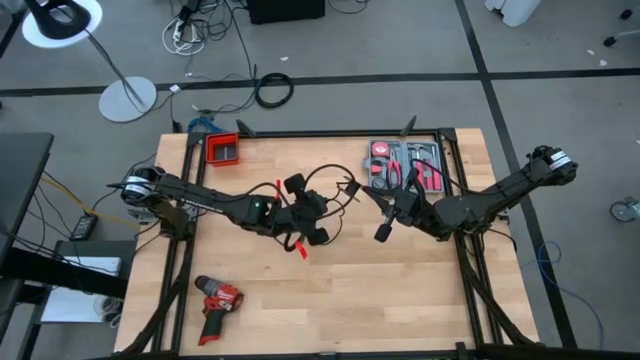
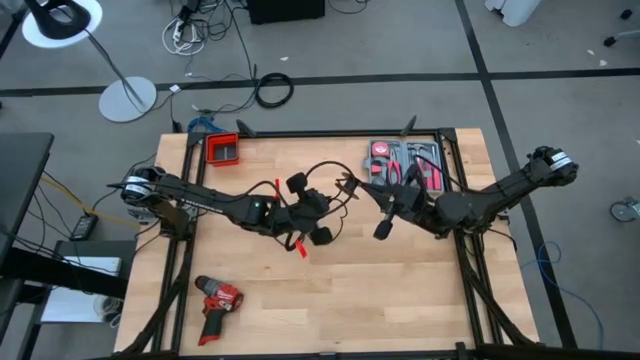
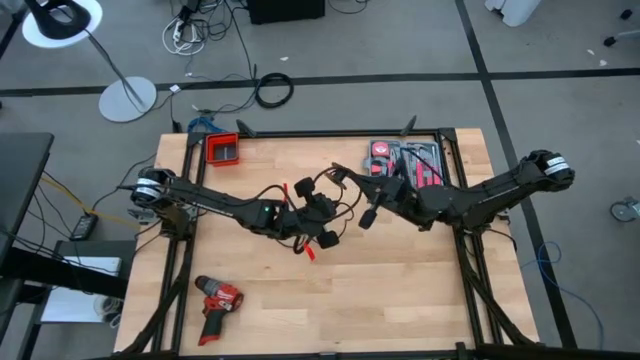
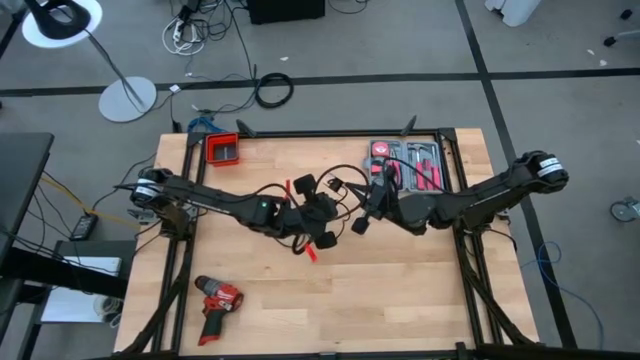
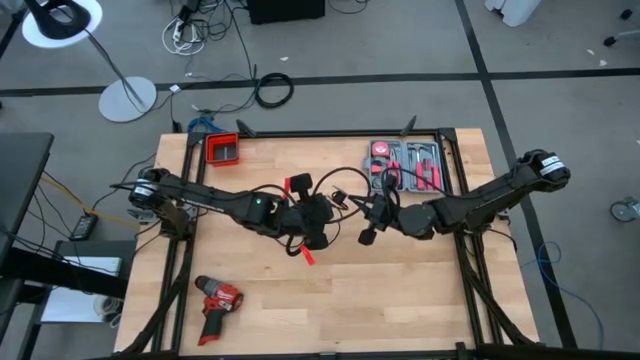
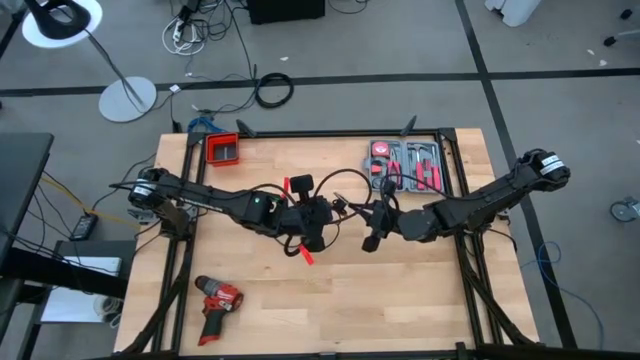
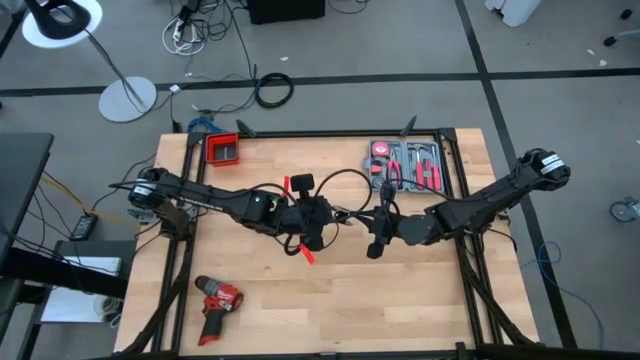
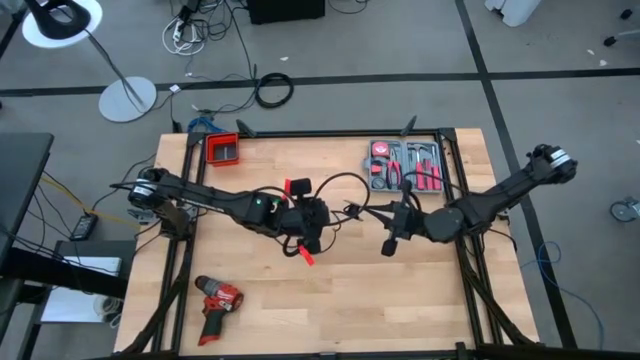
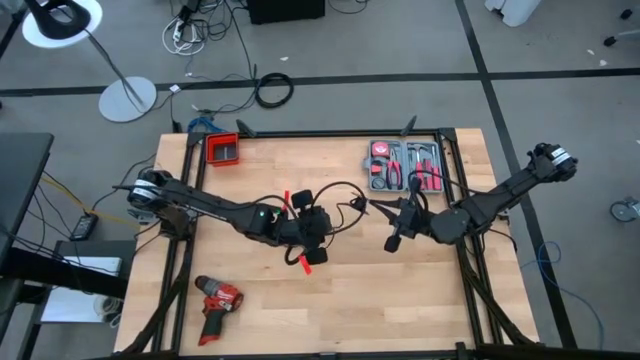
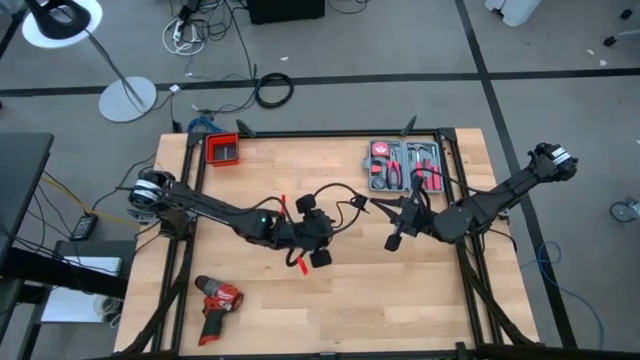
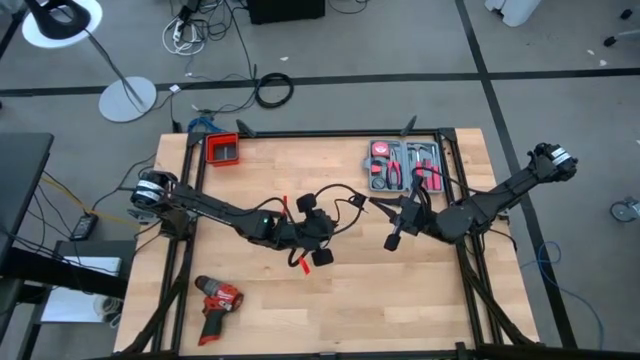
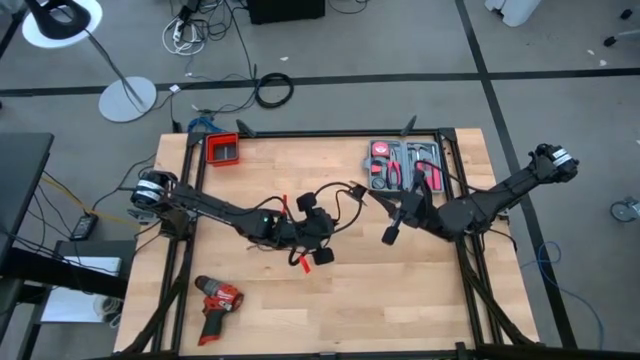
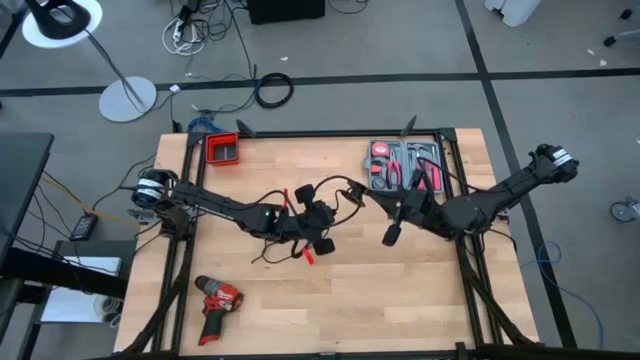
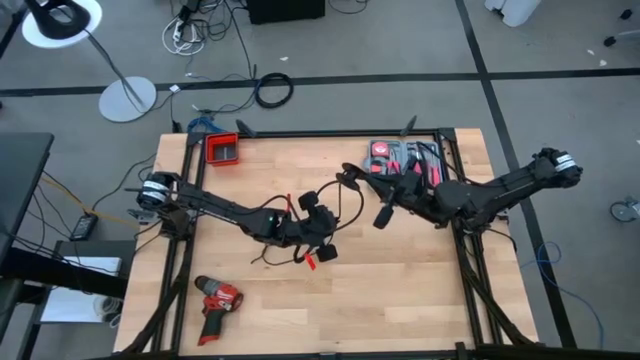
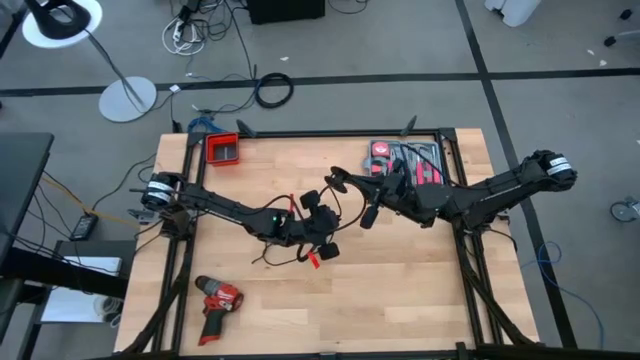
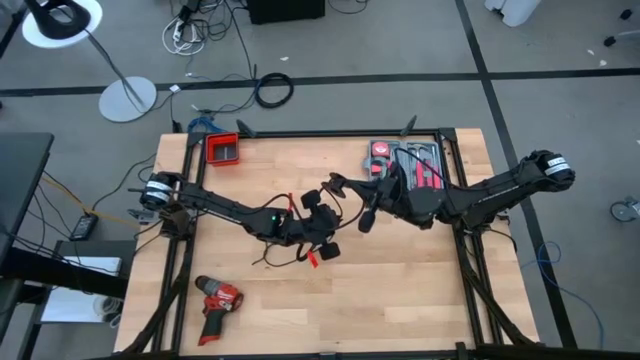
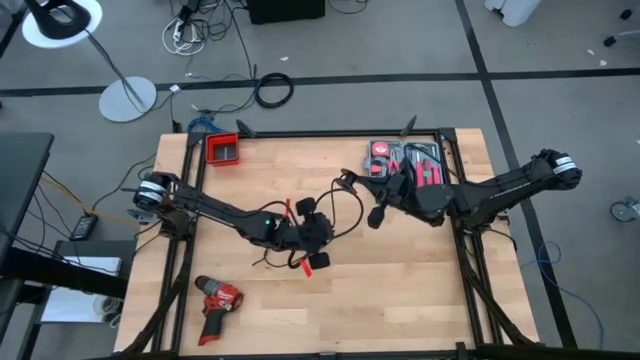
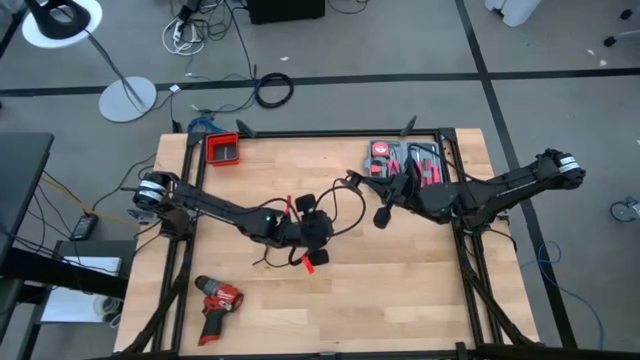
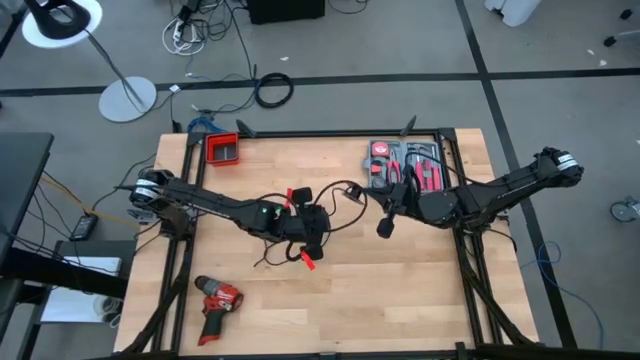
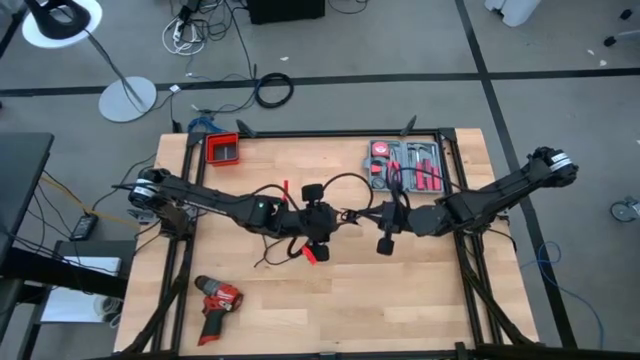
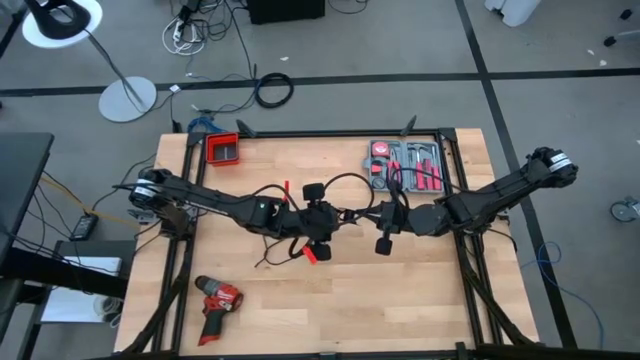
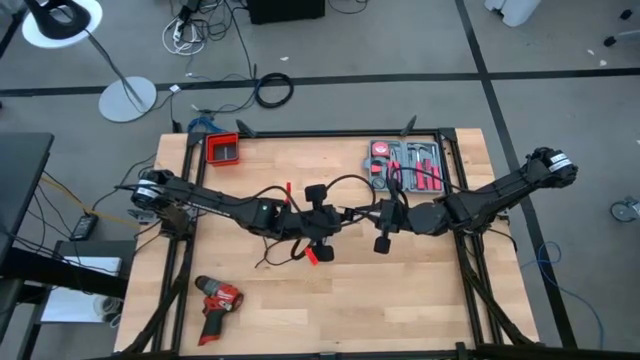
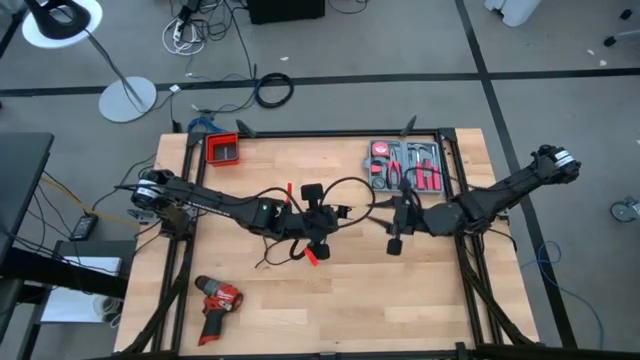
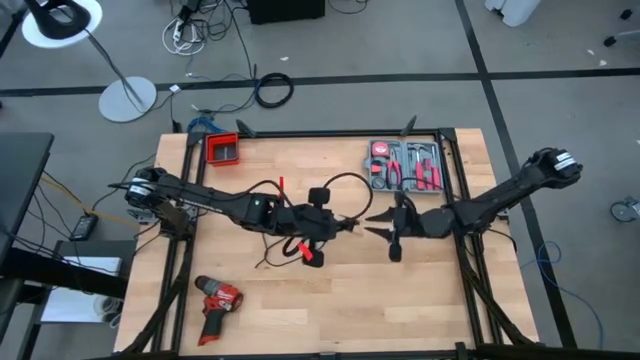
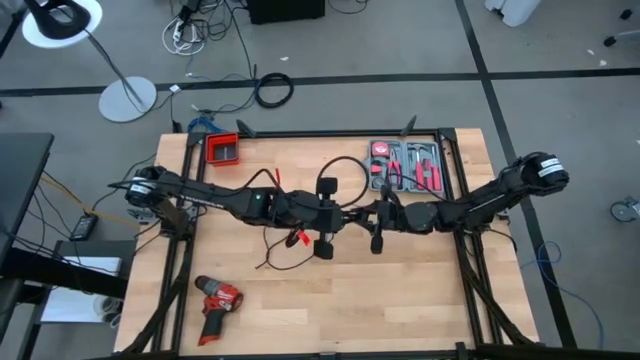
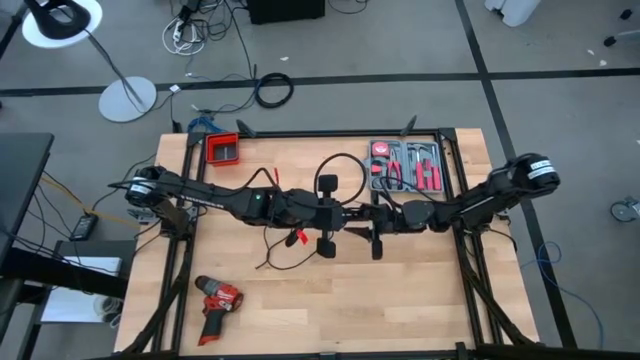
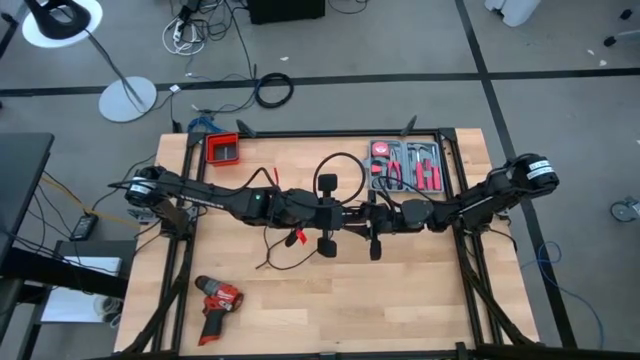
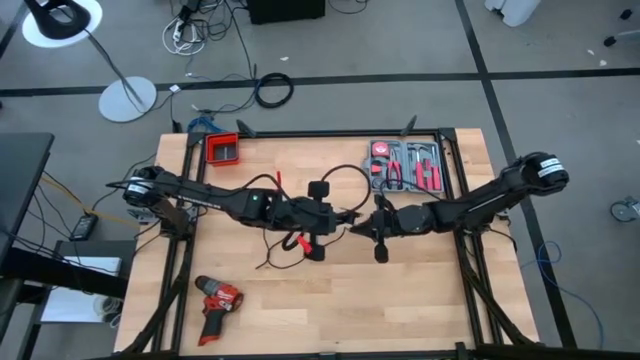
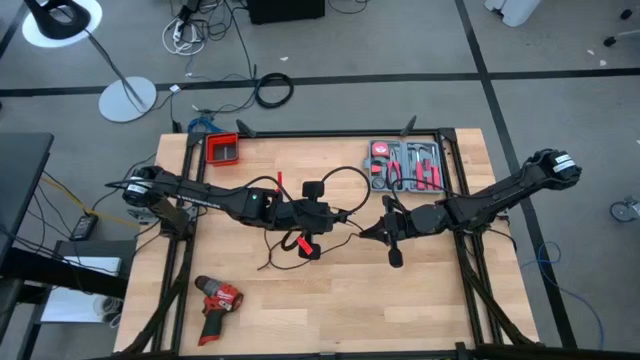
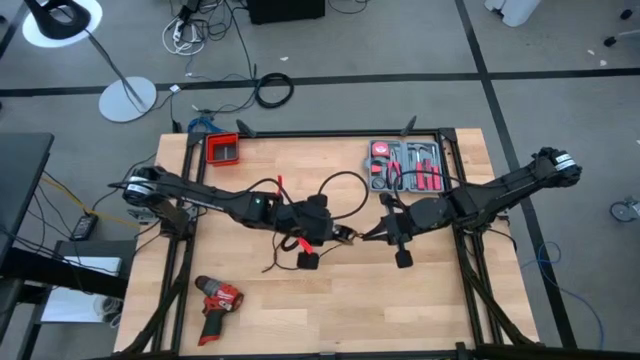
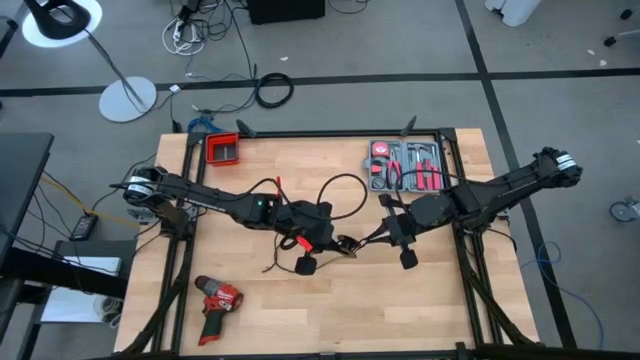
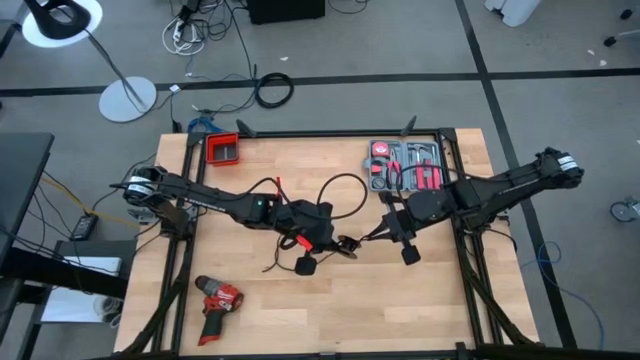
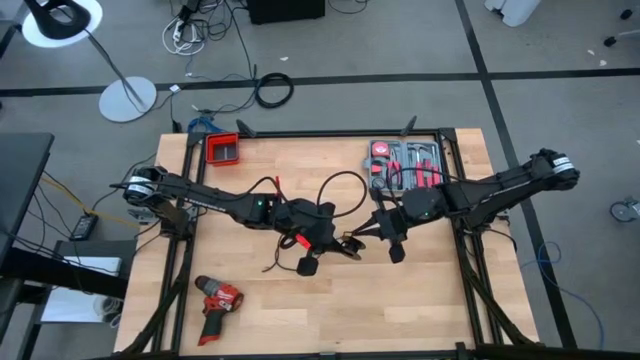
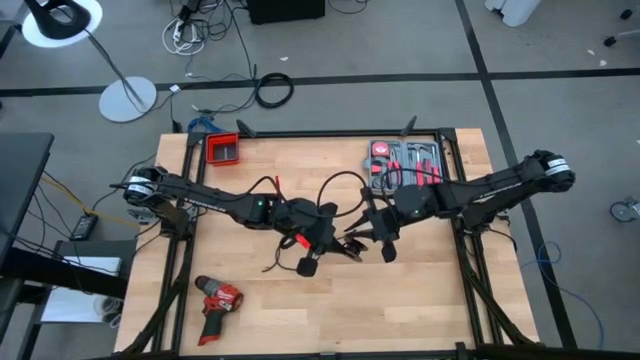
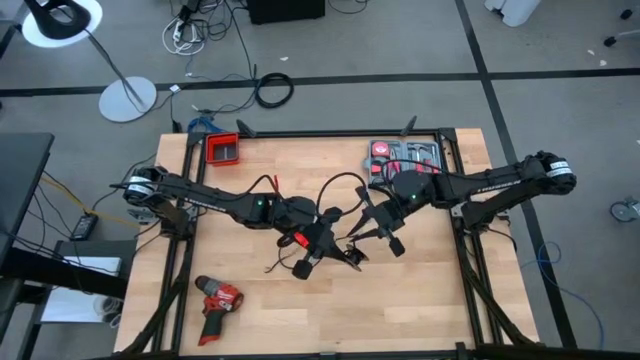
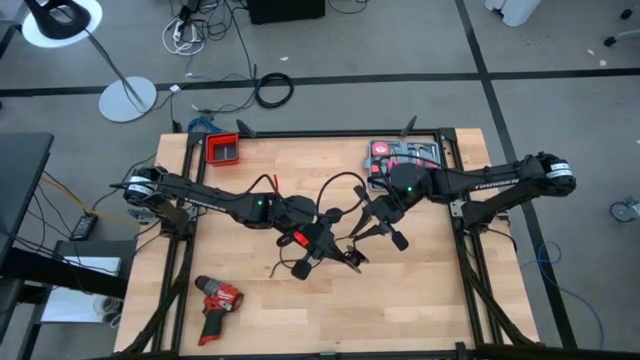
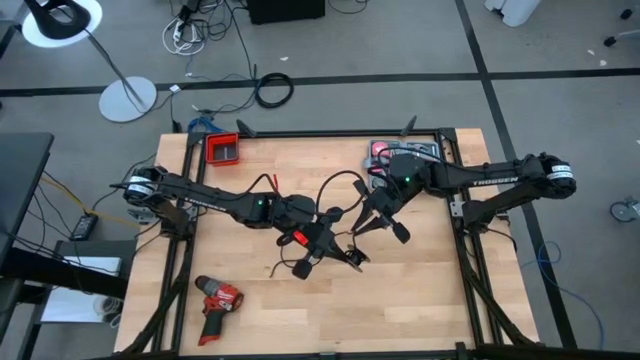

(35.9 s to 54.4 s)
Task: Coil cords
Coil the black wire onto the black spool
